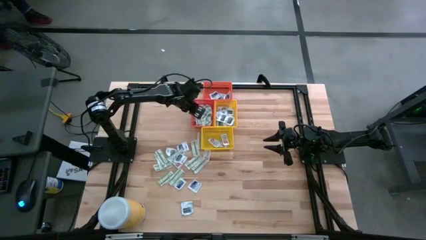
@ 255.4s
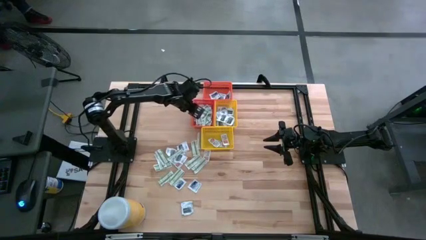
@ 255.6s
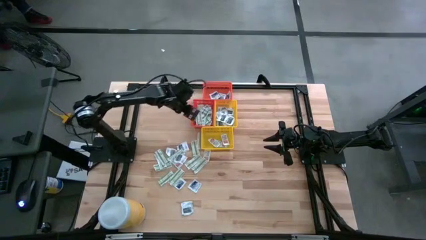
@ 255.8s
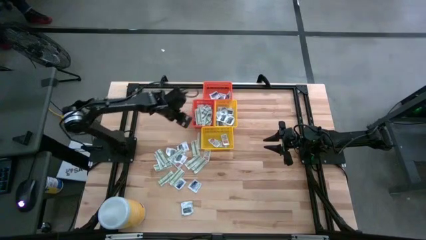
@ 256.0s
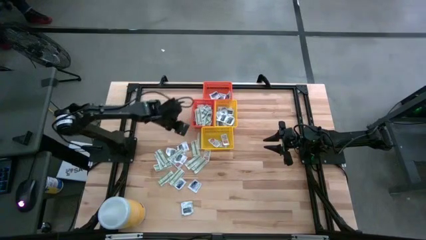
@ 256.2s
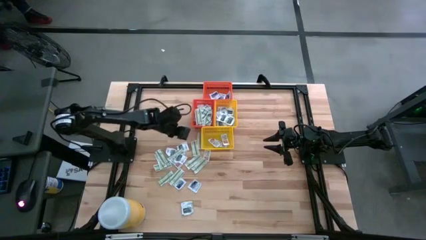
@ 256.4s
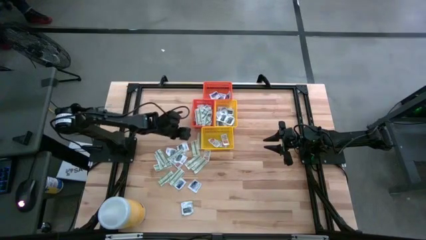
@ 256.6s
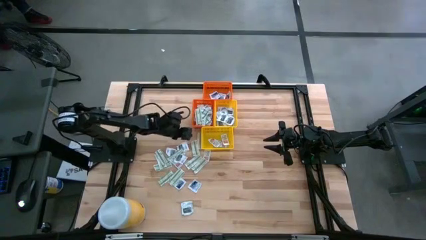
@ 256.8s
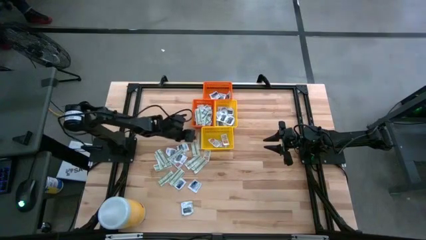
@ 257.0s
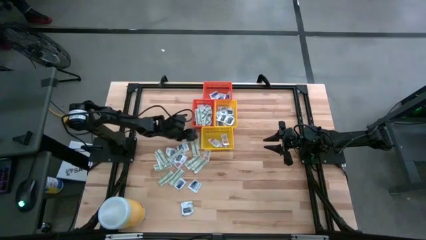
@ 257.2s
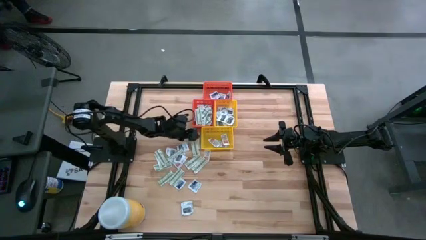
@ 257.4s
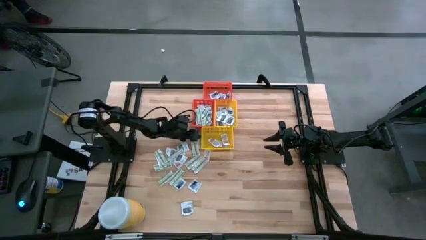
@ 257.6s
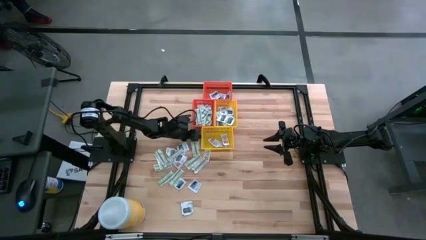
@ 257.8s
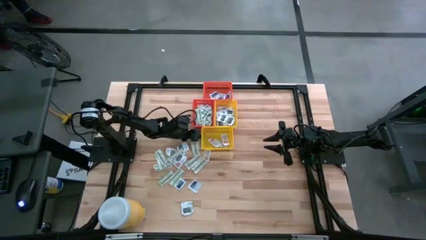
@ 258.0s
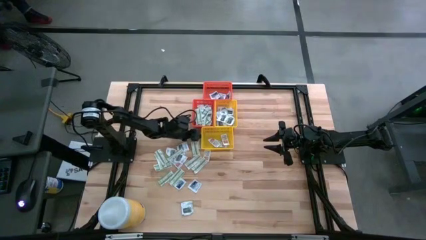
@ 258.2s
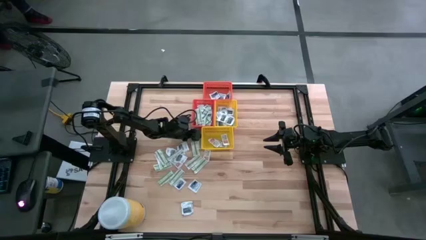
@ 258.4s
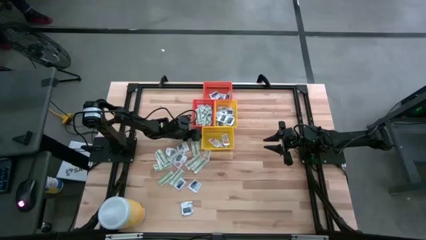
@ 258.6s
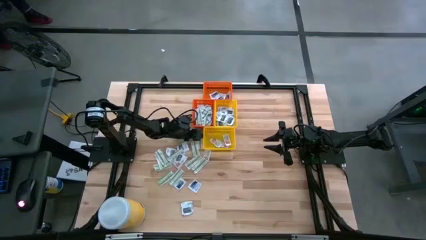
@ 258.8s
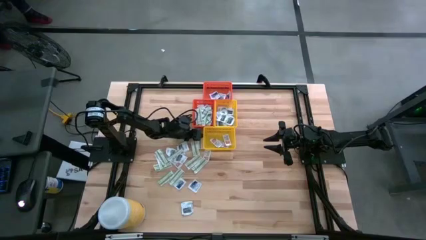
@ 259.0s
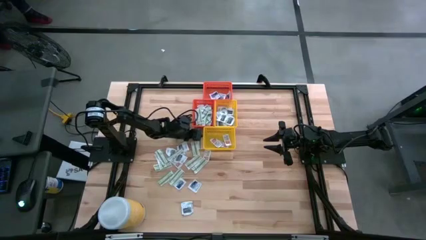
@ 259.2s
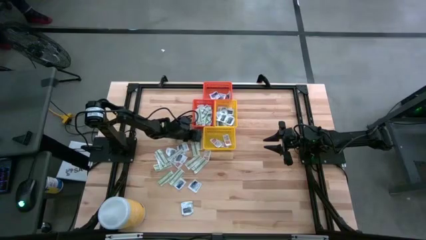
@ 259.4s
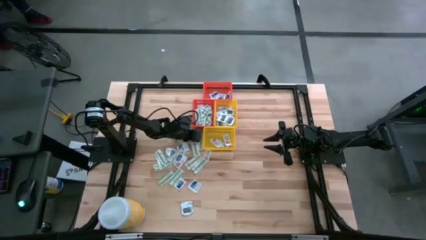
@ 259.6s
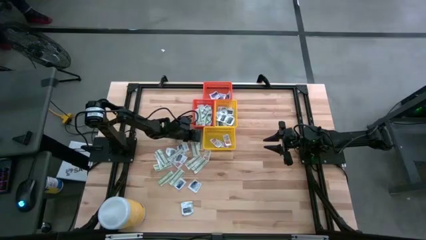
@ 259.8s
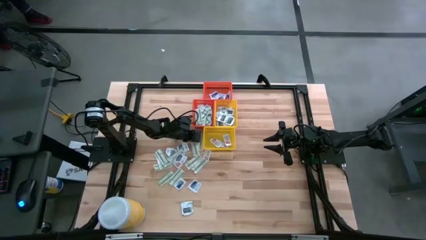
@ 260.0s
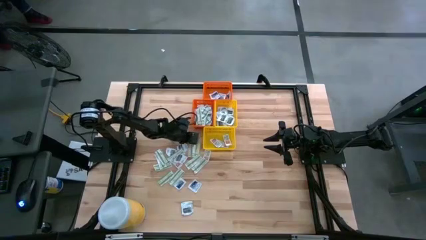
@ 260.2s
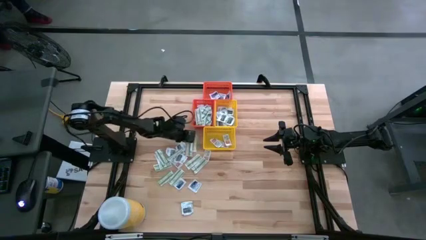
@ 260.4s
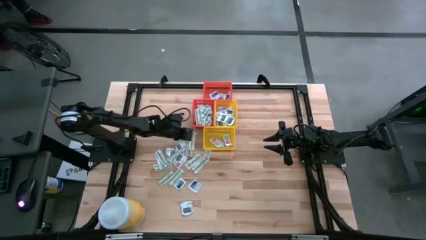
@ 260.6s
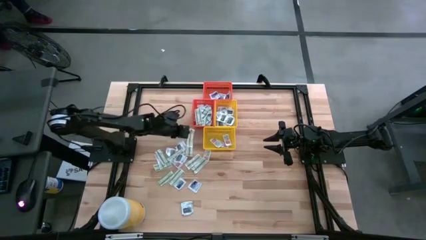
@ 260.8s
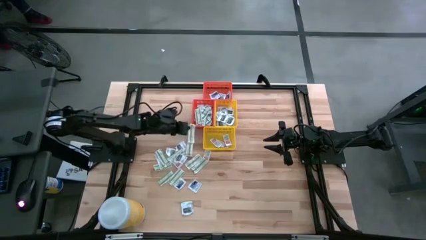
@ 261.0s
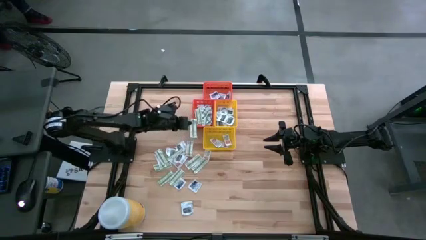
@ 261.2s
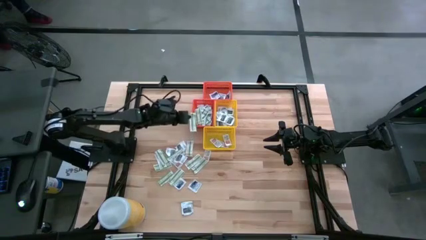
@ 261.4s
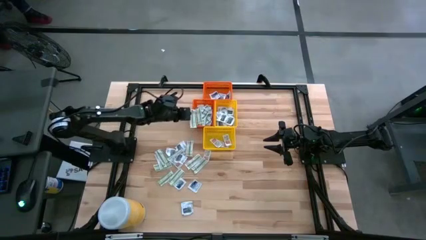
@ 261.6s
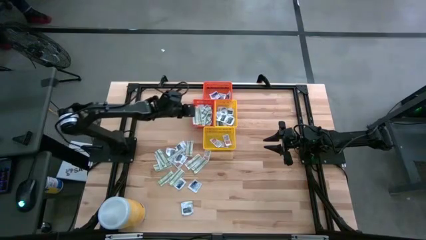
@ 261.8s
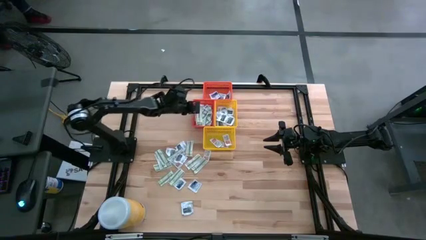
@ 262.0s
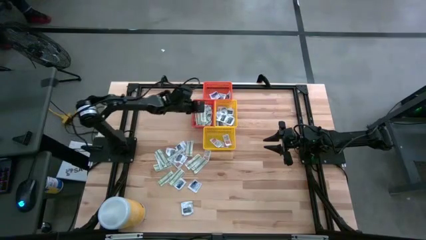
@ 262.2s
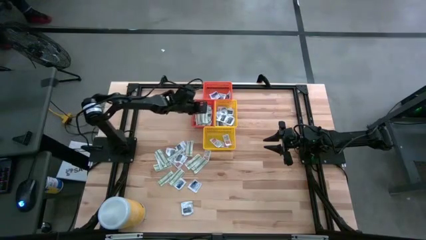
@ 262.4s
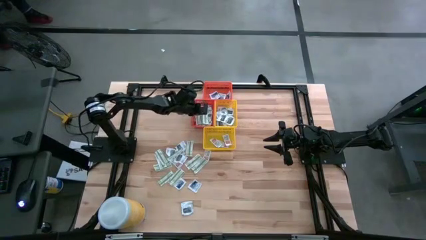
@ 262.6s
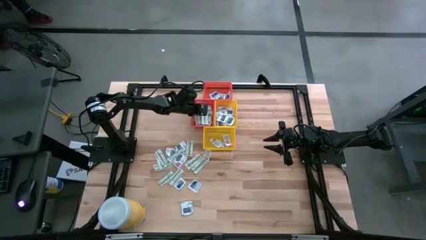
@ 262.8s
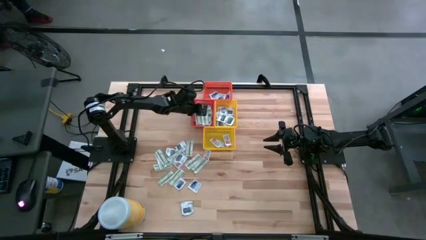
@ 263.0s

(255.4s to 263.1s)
Task: Pick & Place First Aid Supplies
Put the bandage into the bottom orange bin

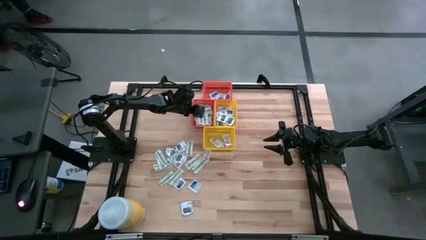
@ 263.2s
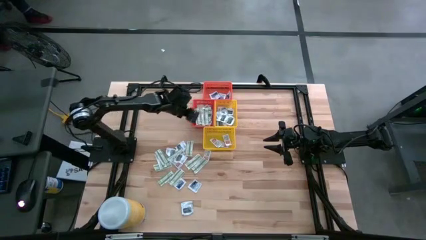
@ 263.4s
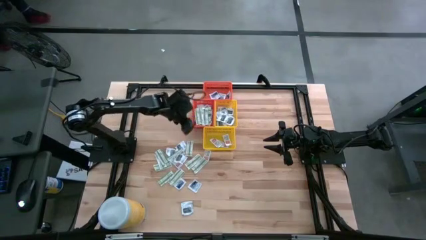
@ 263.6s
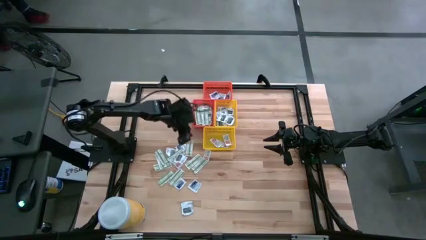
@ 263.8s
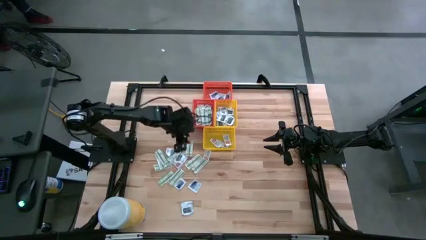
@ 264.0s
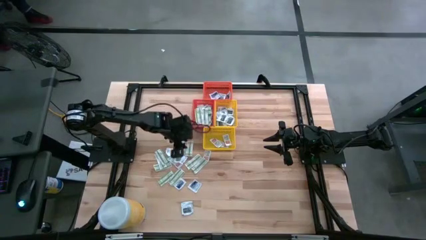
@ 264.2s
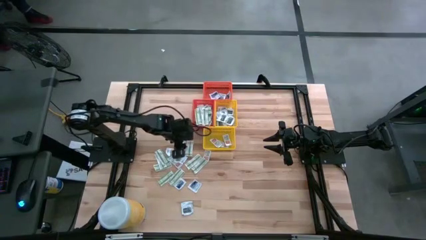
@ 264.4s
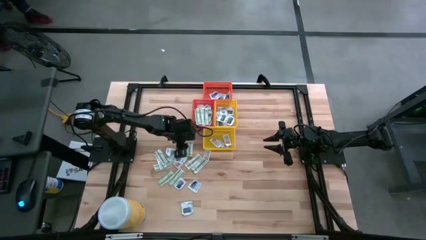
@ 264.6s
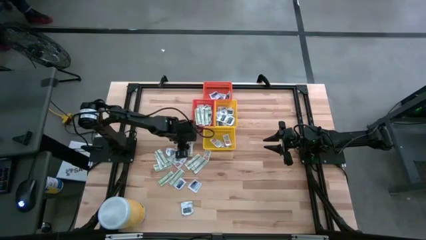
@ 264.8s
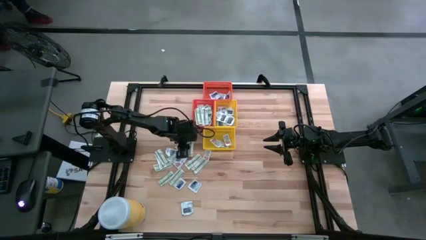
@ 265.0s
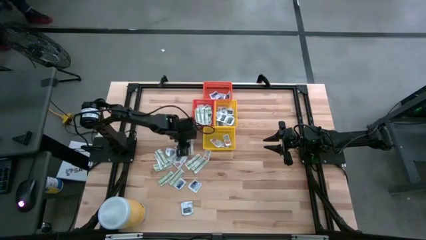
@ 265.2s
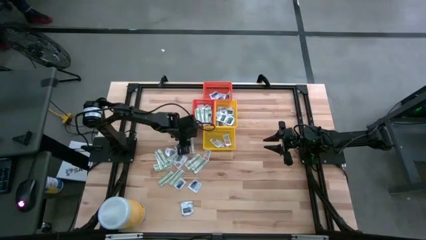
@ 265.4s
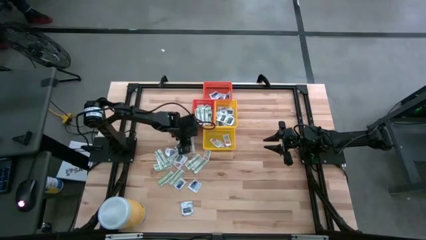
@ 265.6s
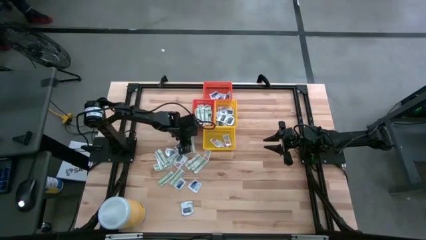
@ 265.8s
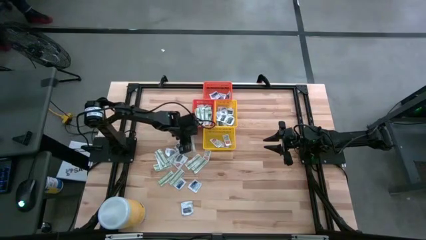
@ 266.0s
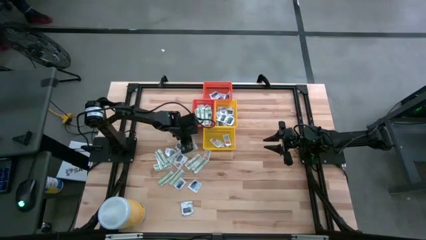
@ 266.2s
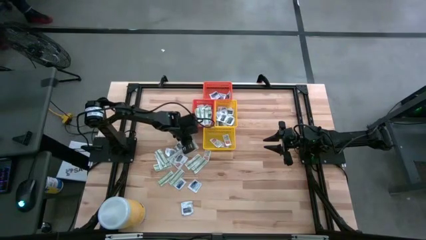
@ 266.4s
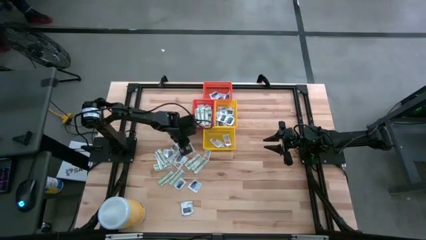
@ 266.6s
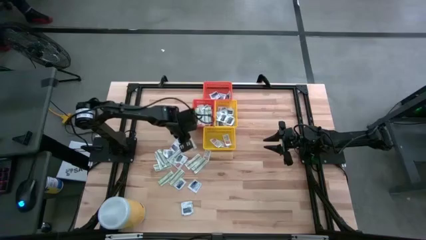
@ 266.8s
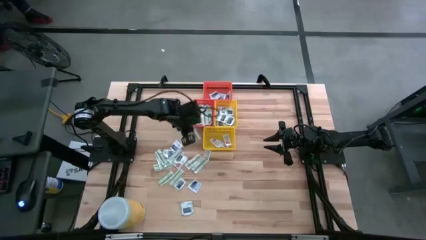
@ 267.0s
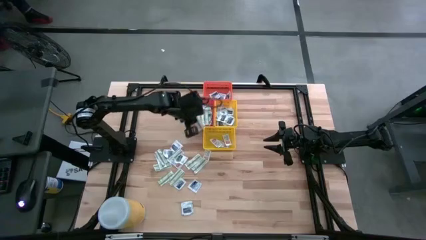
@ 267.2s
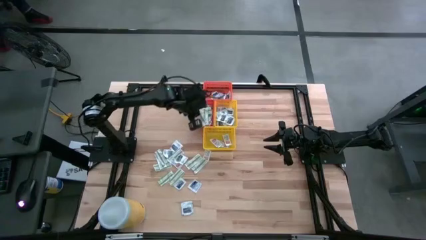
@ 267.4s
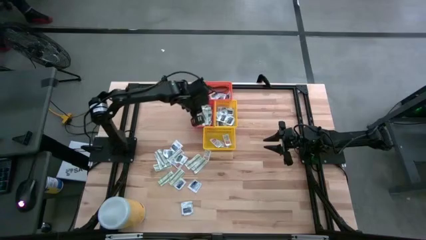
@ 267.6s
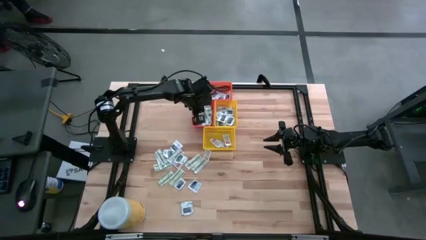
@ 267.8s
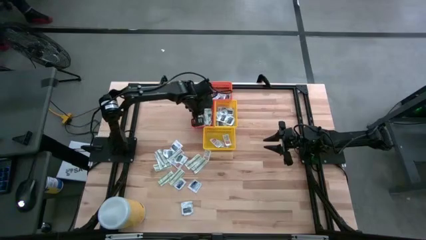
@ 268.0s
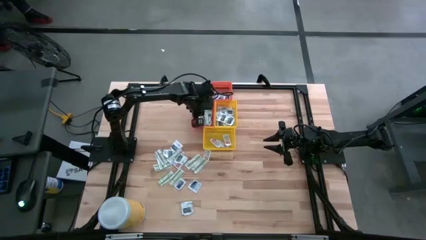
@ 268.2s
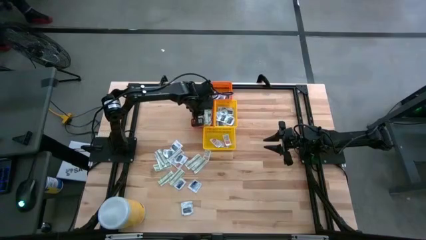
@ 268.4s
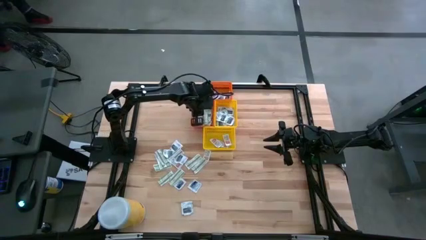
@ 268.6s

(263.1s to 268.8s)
Put the bandage into the bottom orange bin
